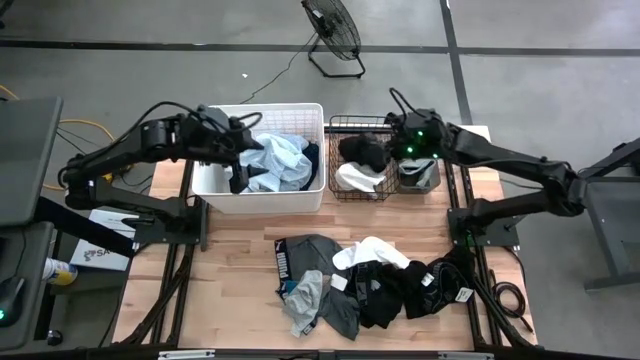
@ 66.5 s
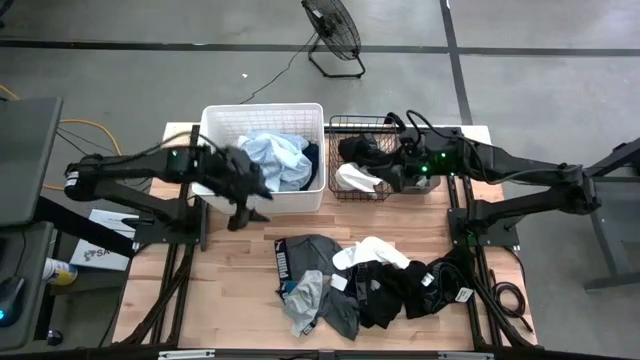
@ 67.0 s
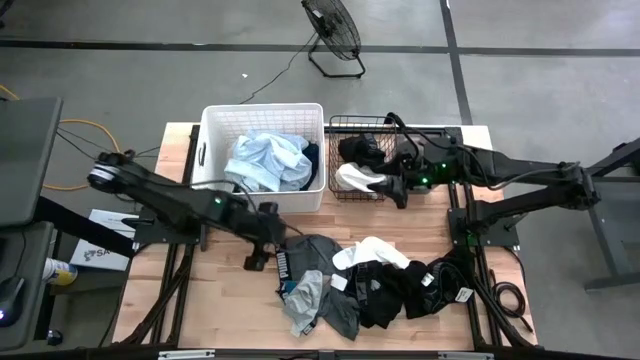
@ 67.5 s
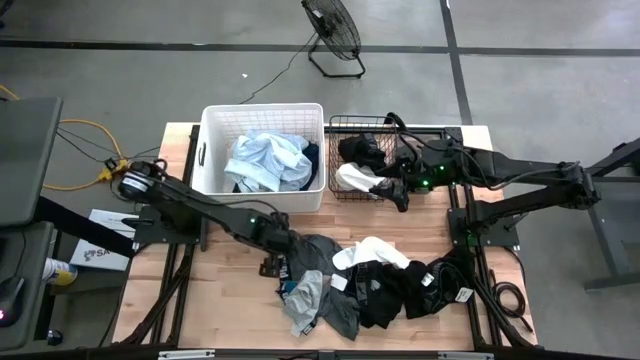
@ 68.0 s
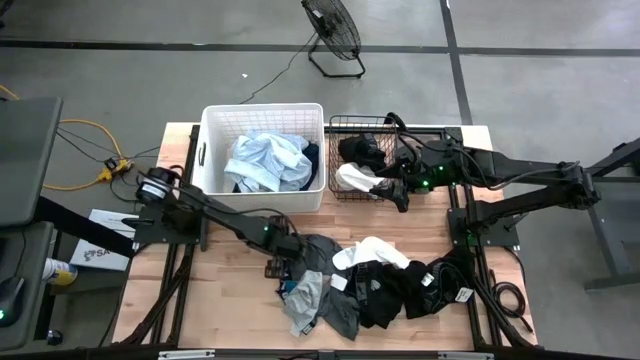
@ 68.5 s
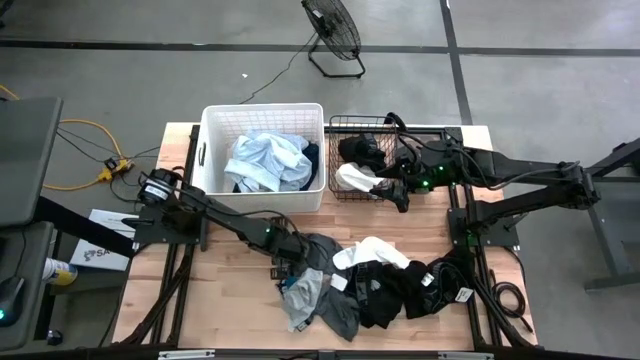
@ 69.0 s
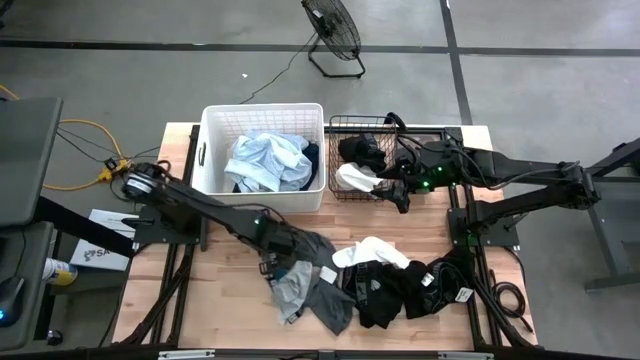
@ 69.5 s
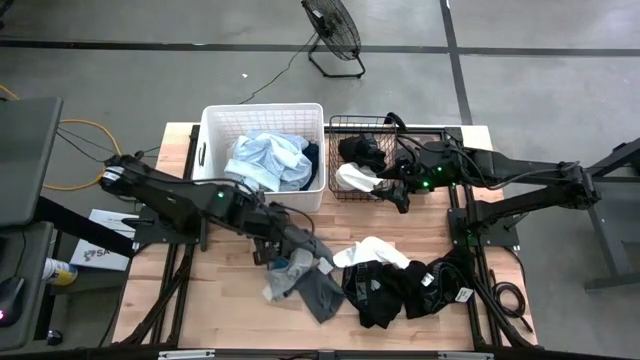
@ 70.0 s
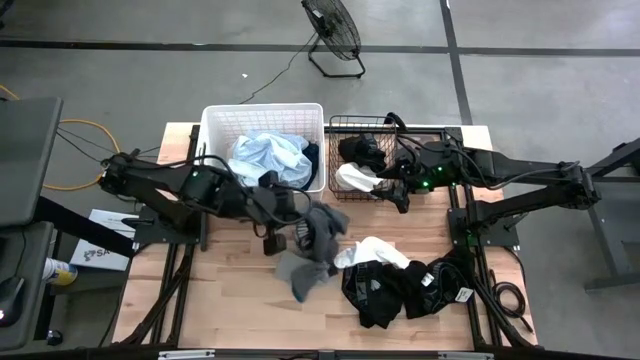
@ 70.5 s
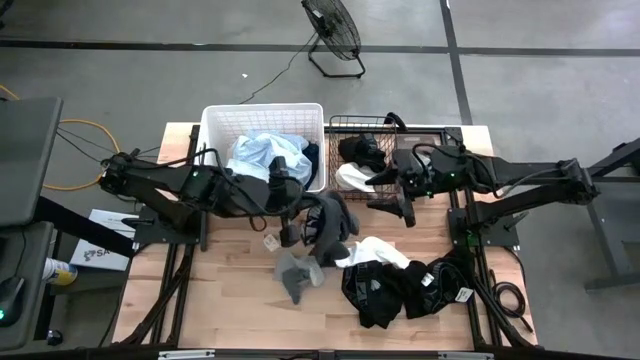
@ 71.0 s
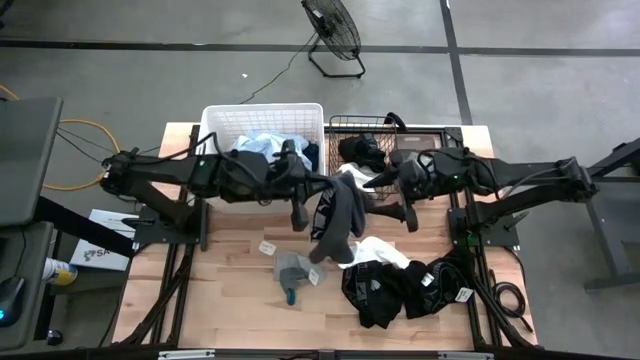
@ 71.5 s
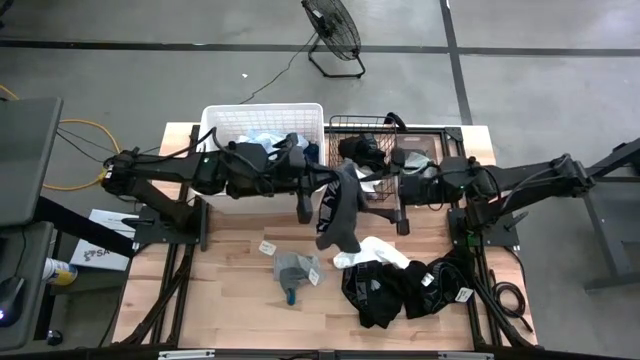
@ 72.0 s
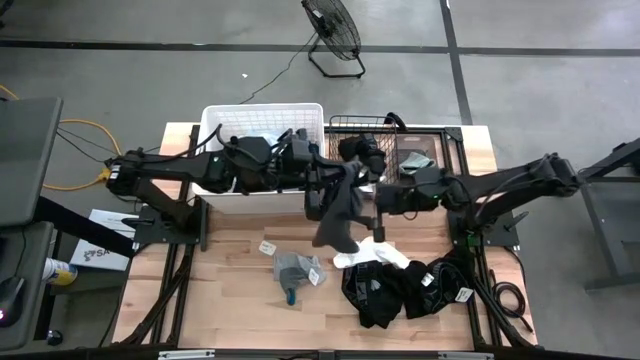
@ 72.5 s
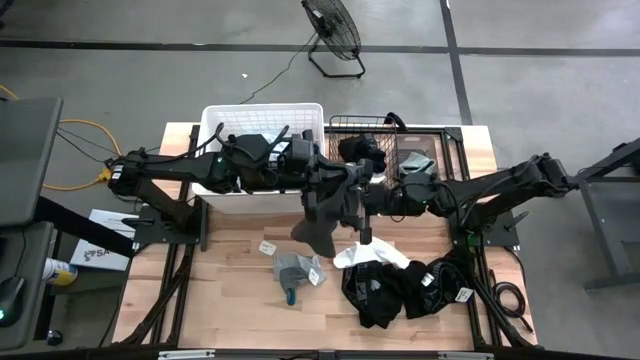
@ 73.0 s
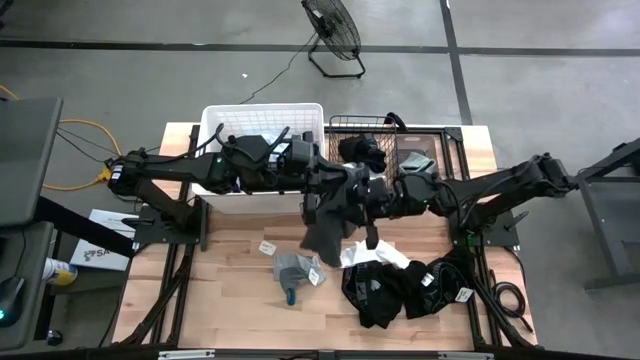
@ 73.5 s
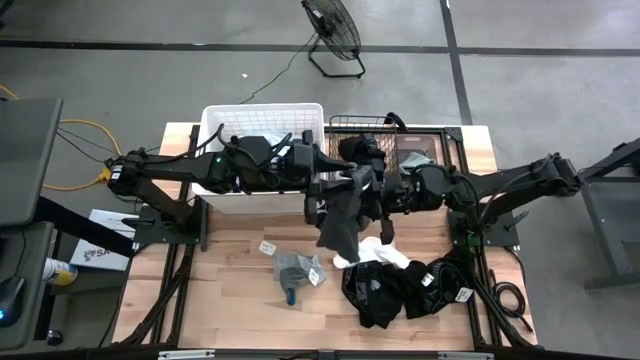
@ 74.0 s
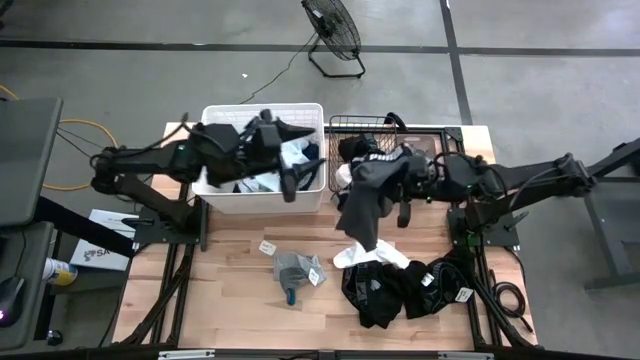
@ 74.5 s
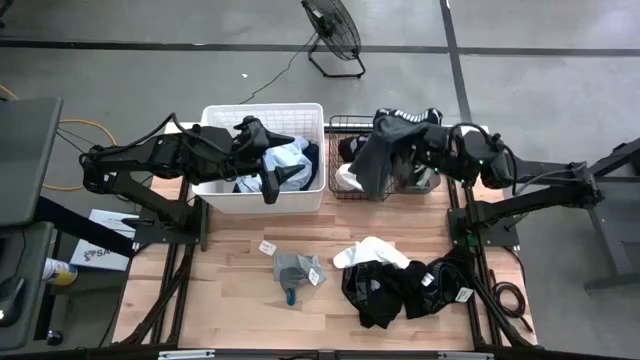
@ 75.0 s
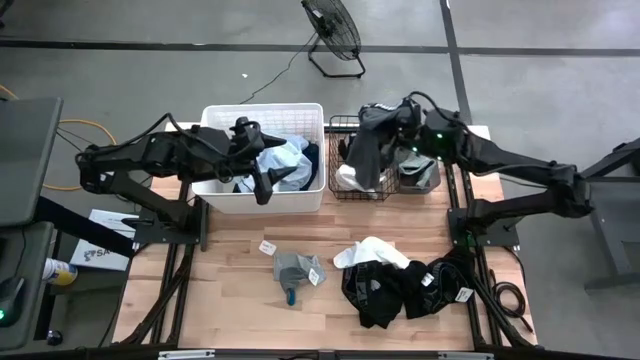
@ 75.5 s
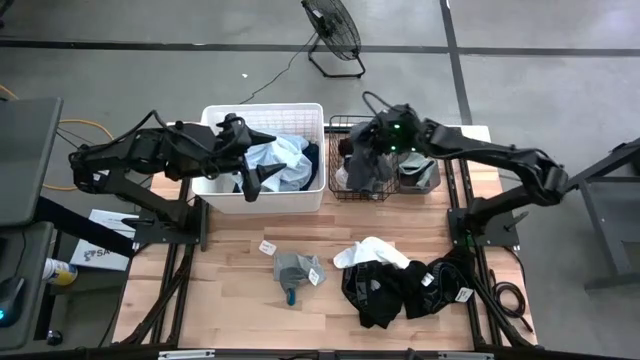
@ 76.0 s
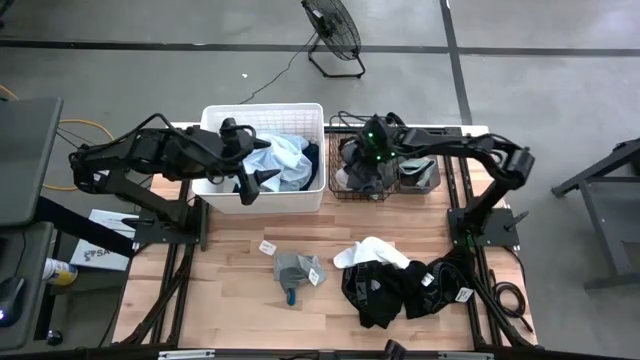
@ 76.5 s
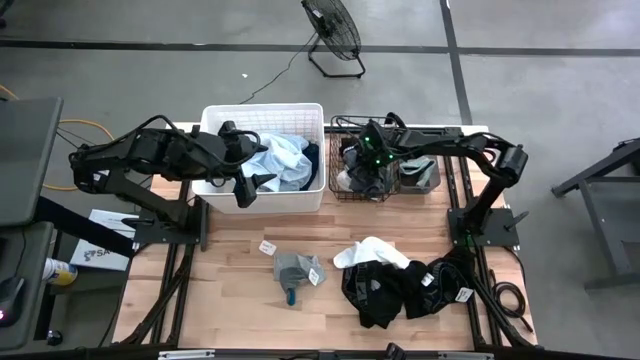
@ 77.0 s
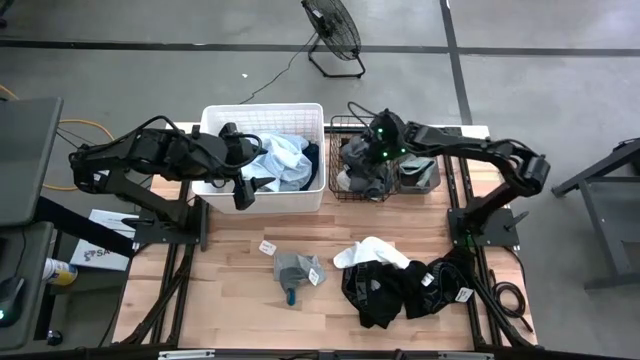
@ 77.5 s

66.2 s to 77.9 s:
Task: Pick & Place Cloths
Put the gray underwear into the black wire basket

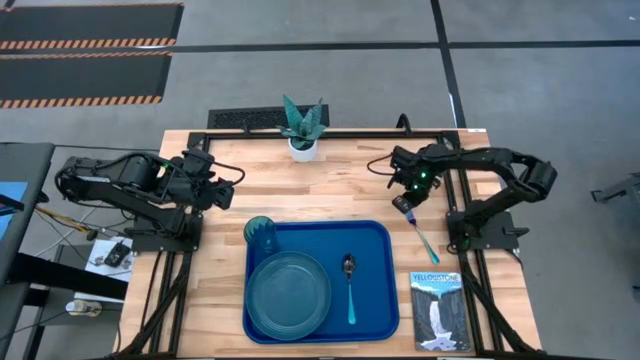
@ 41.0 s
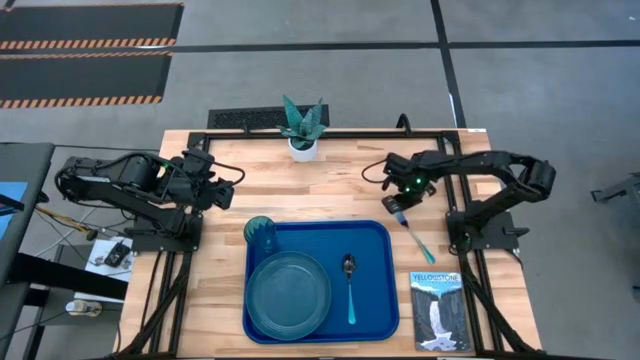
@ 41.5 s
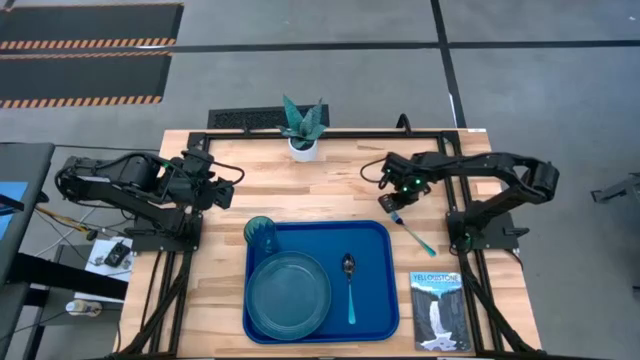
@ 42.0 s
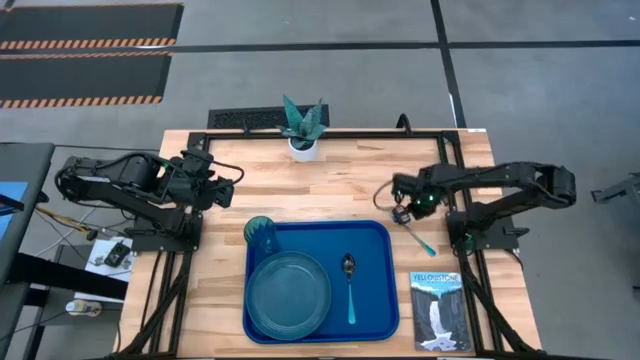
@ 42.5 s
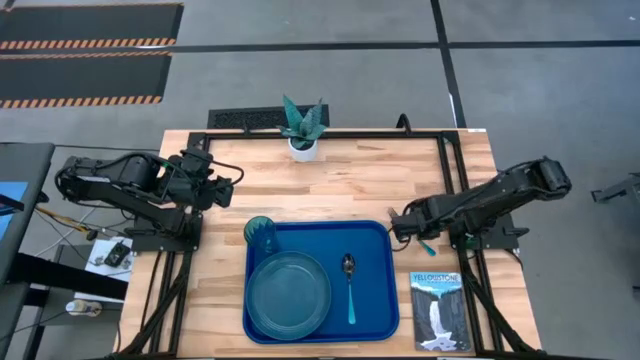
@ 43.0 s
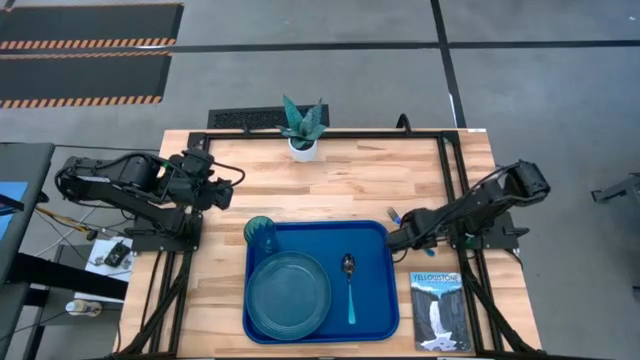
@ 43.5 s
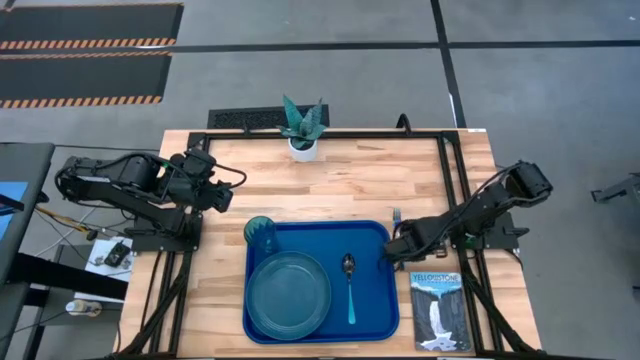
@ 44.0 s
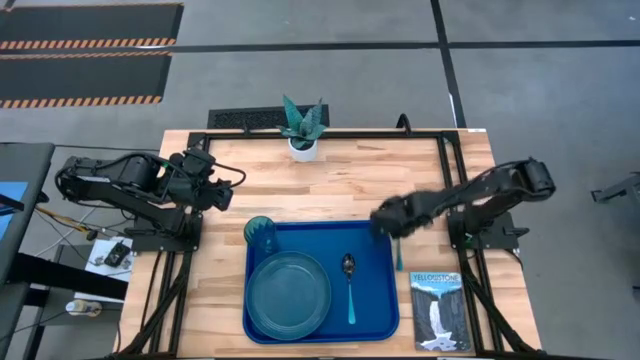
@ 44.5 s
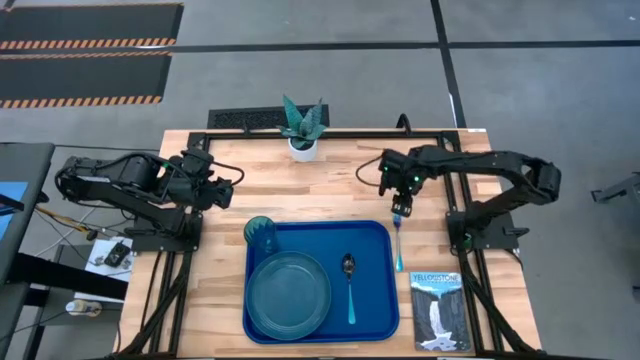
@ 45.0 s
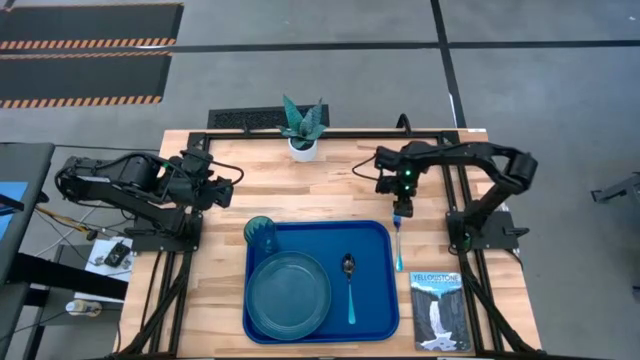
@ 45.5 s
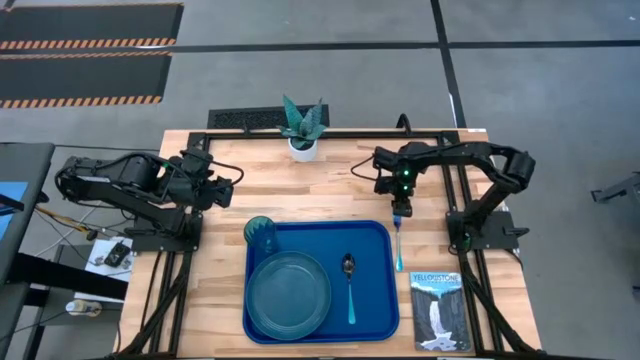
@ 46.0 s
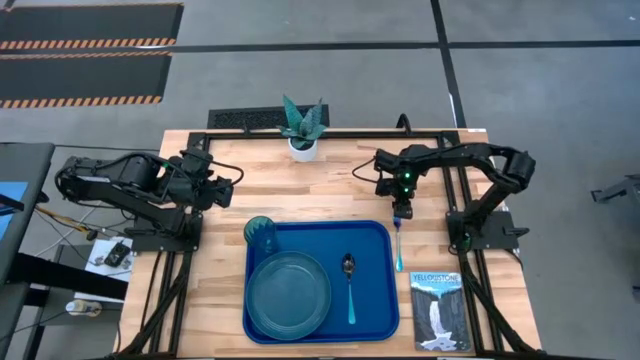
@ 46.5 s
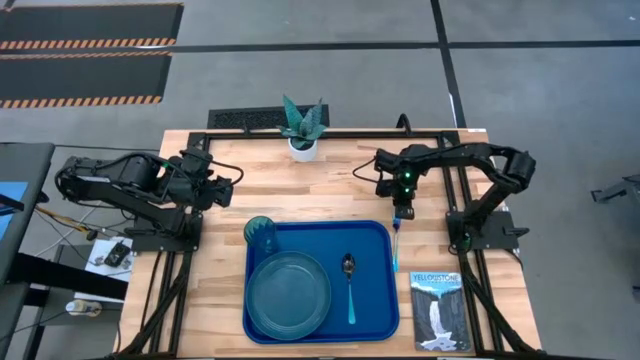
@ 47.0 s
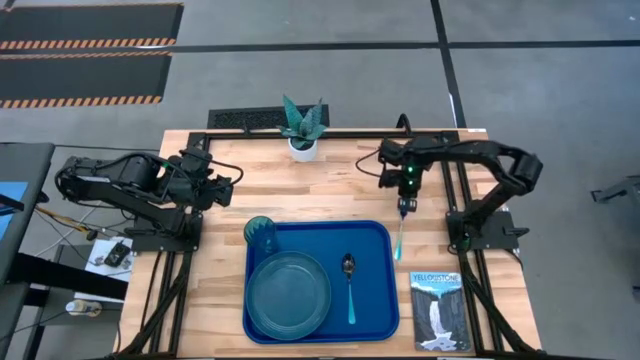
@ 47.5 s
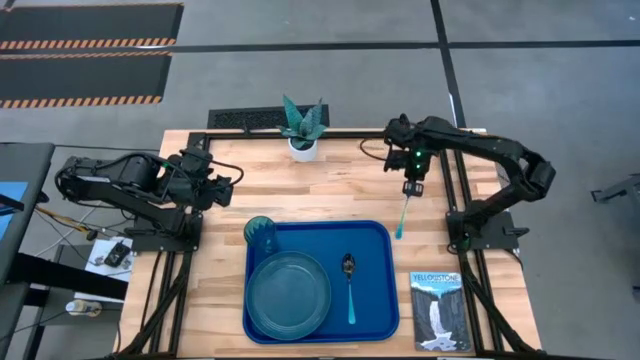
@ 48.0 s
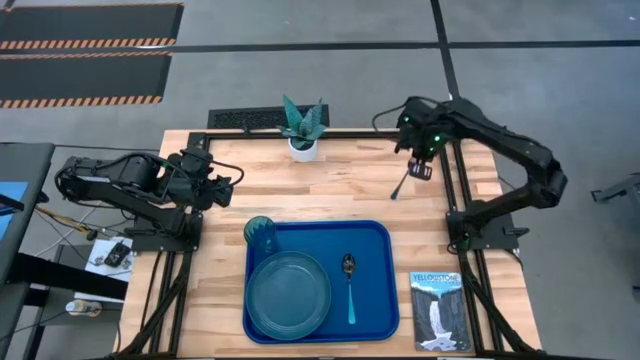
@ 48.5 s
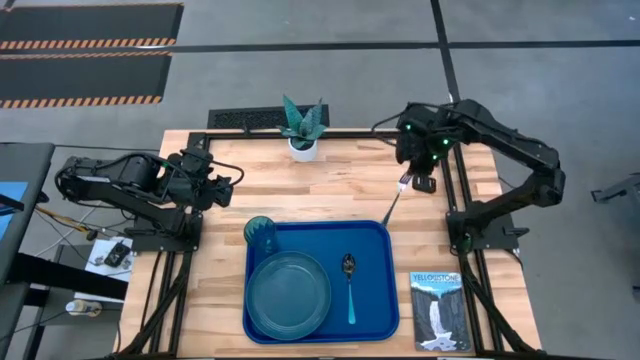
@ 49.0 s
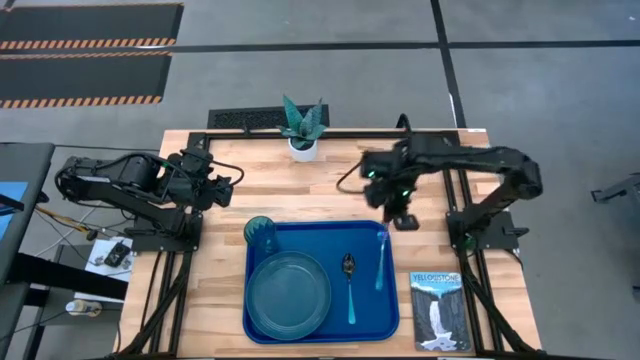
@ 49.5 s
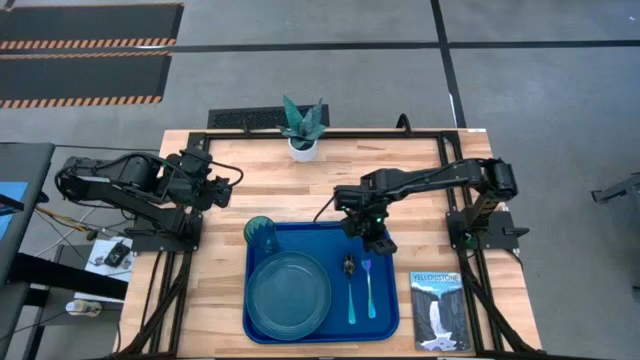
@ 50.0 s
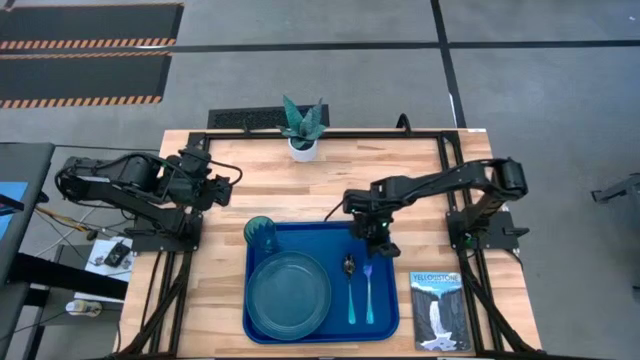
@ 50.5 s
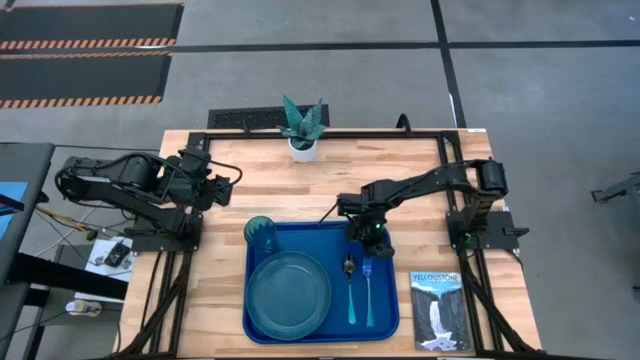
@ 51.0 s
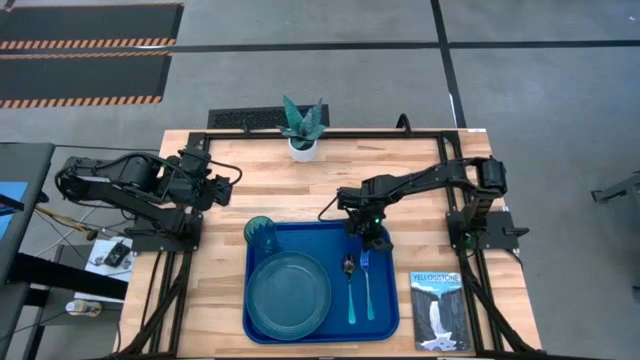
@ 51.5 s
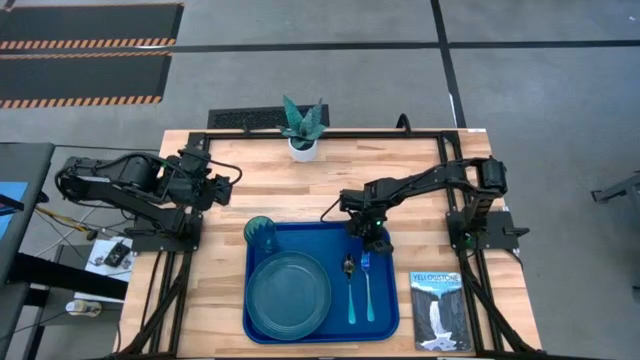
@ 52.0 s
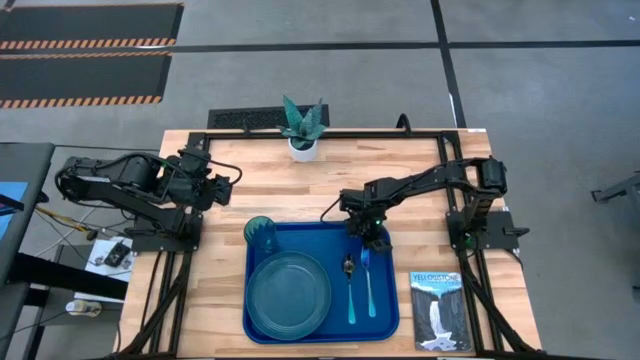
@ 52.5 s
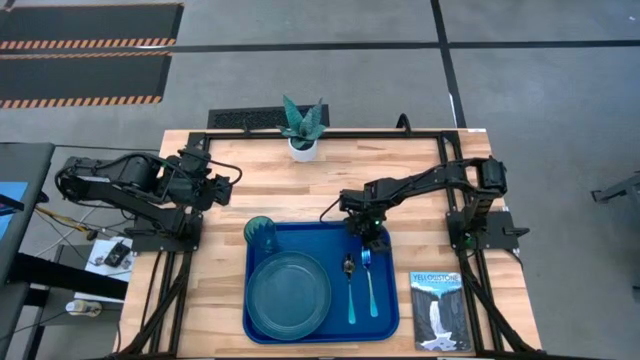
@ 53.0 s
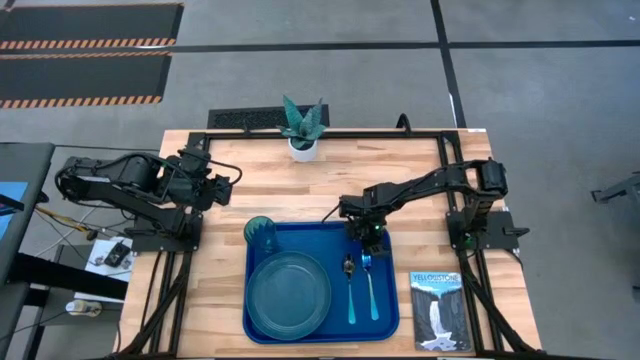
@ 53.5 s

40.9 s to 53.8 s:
Task: Pick and place plate/cup/fork/spoon on tray
Put the blue fork on the blue tray to the right of the blue spoon
